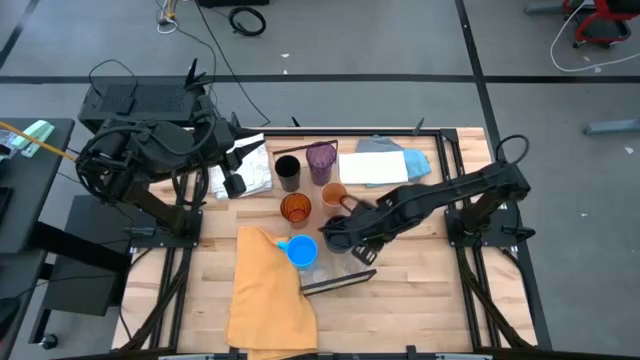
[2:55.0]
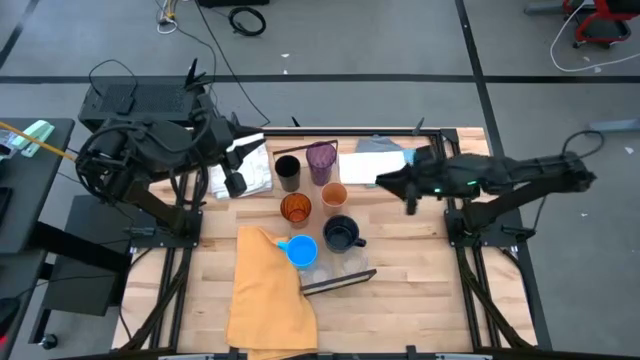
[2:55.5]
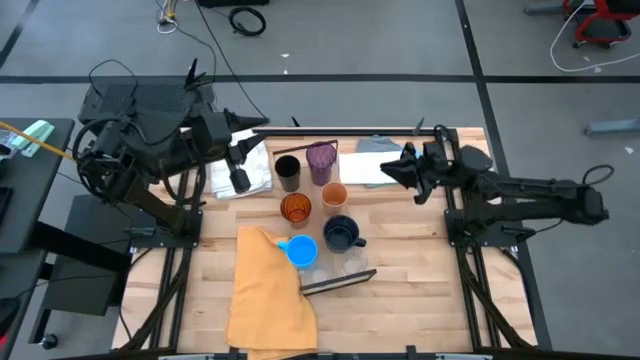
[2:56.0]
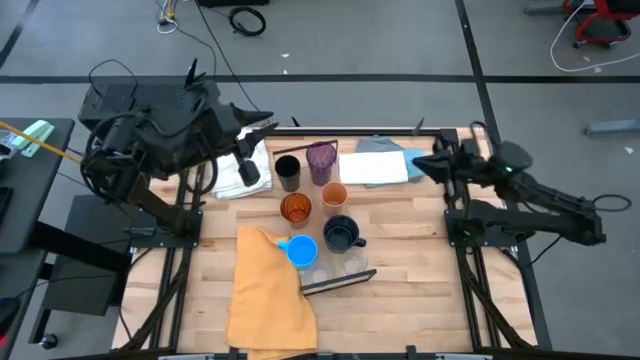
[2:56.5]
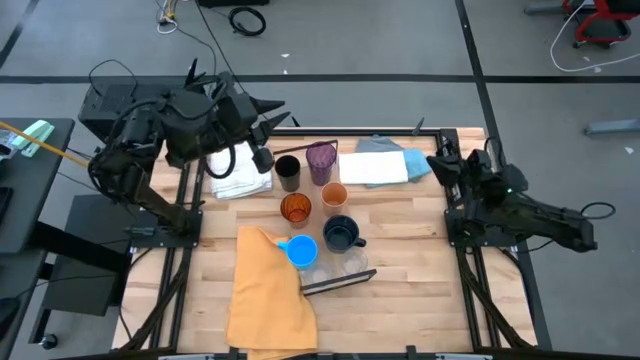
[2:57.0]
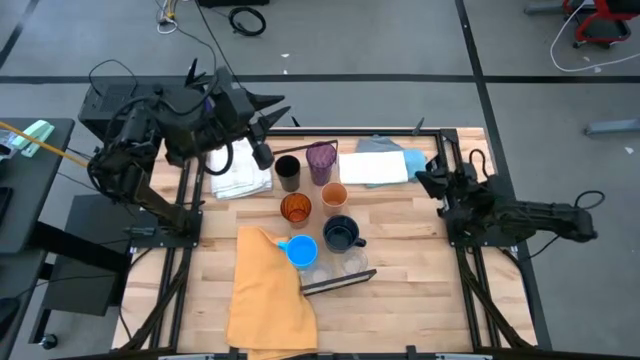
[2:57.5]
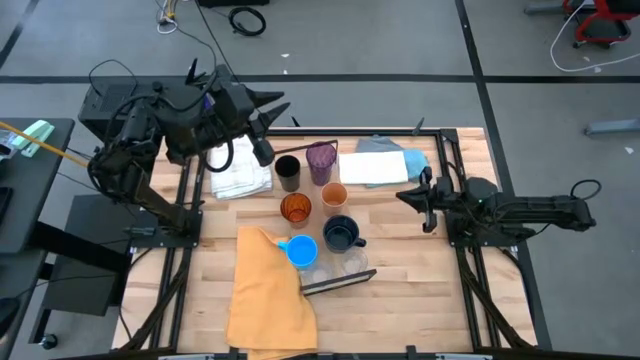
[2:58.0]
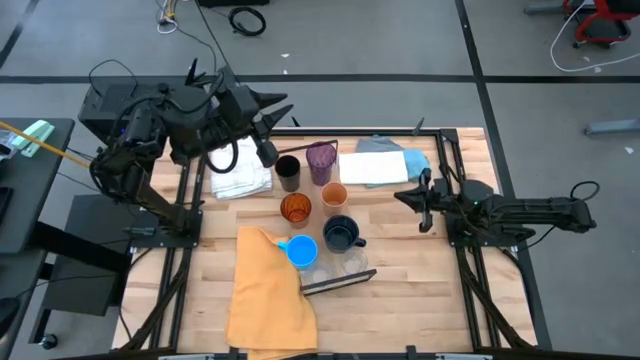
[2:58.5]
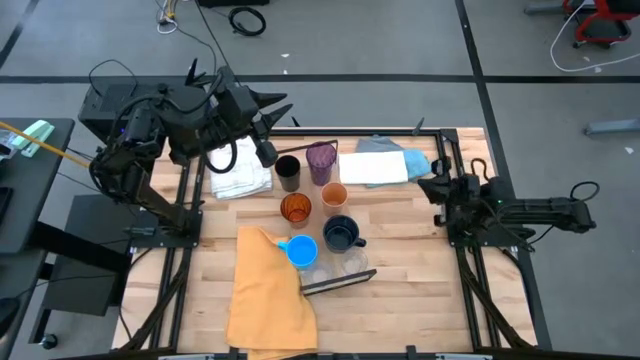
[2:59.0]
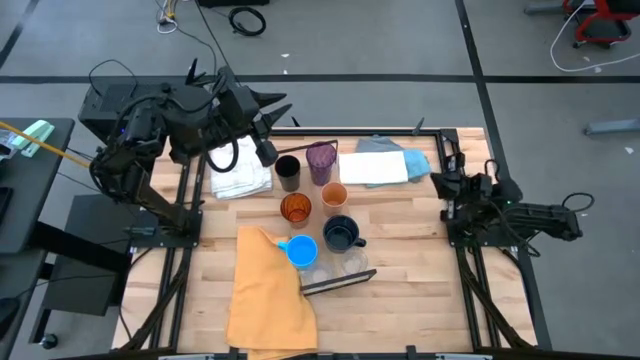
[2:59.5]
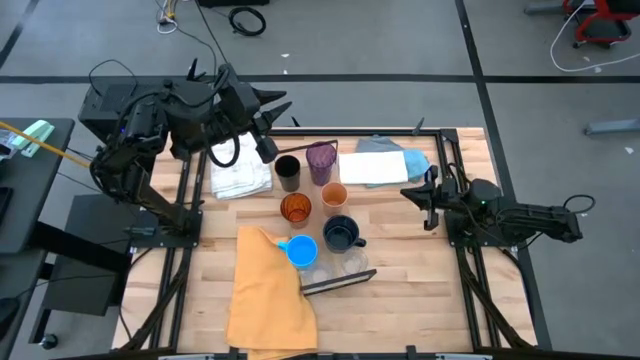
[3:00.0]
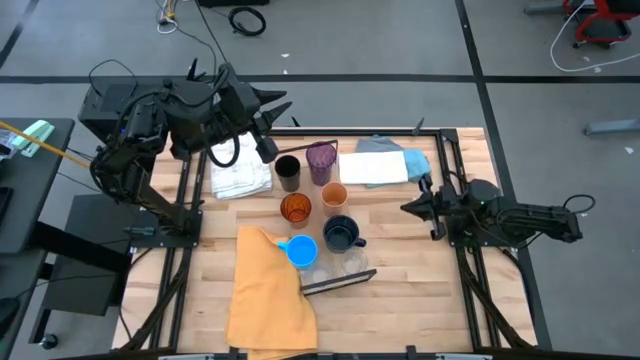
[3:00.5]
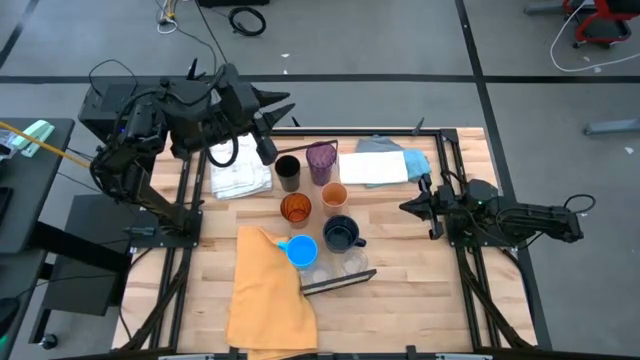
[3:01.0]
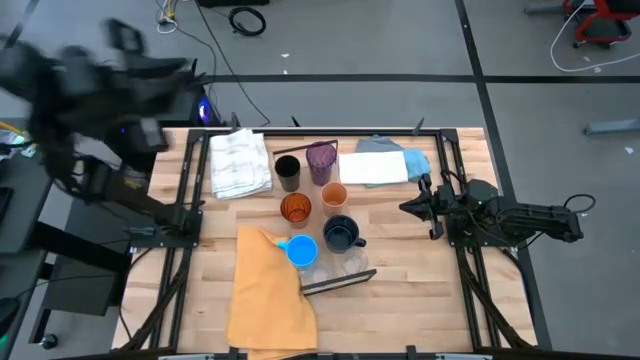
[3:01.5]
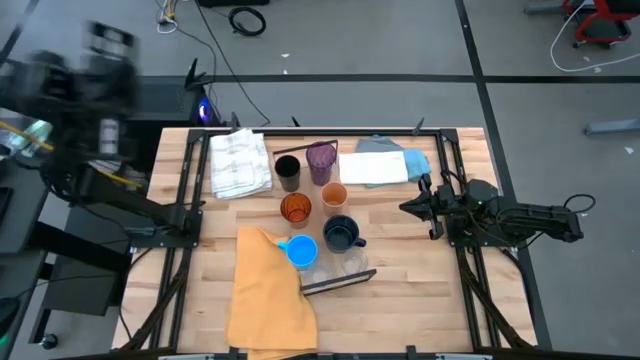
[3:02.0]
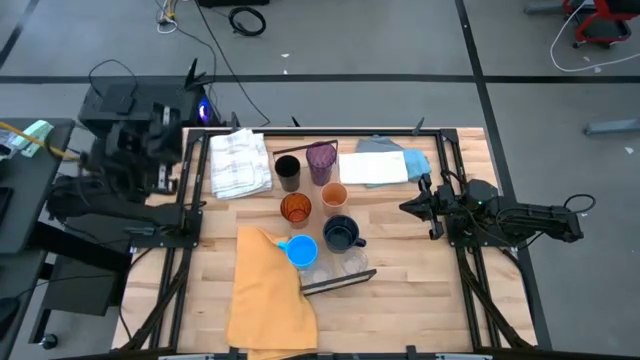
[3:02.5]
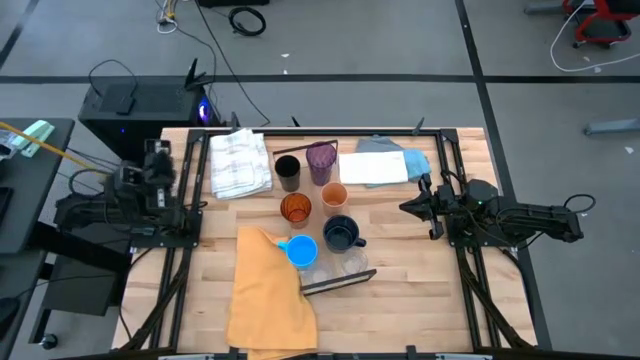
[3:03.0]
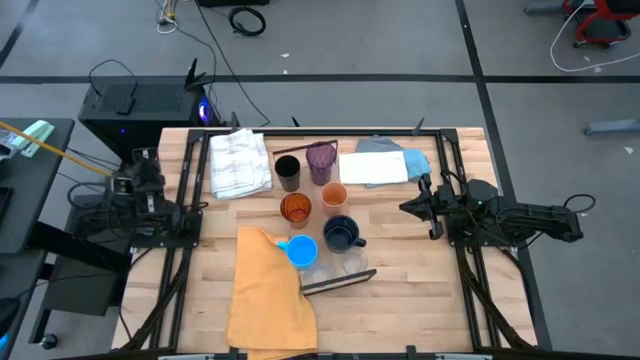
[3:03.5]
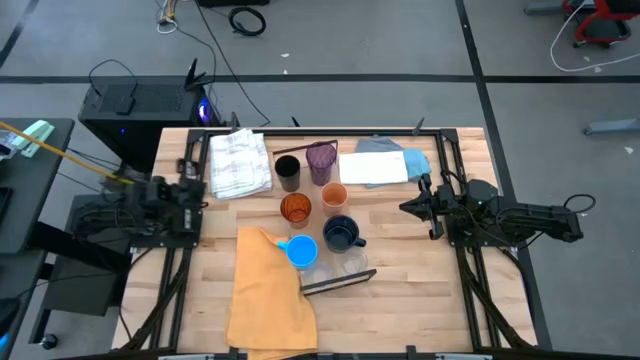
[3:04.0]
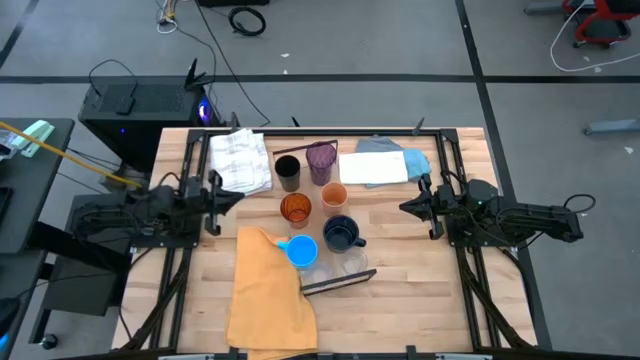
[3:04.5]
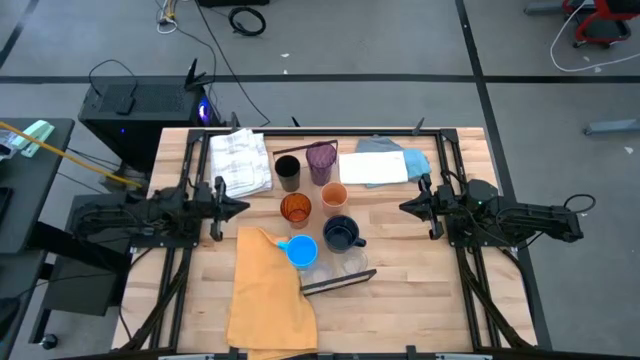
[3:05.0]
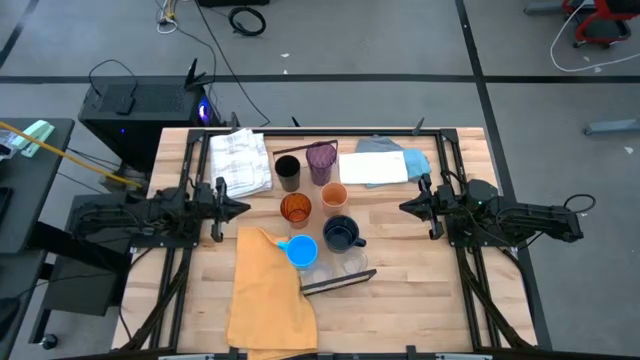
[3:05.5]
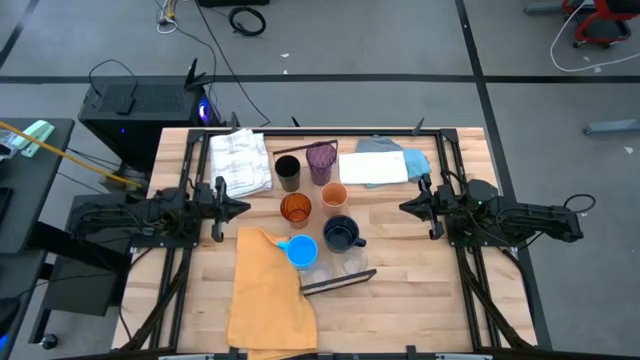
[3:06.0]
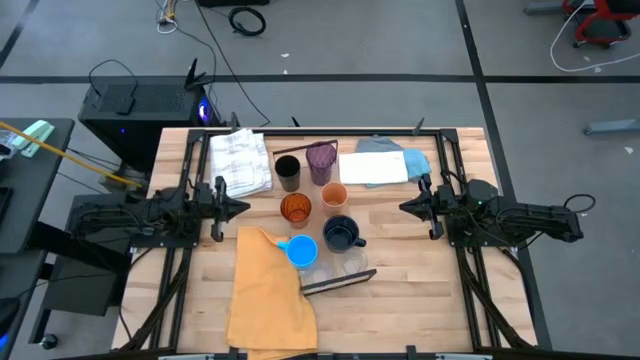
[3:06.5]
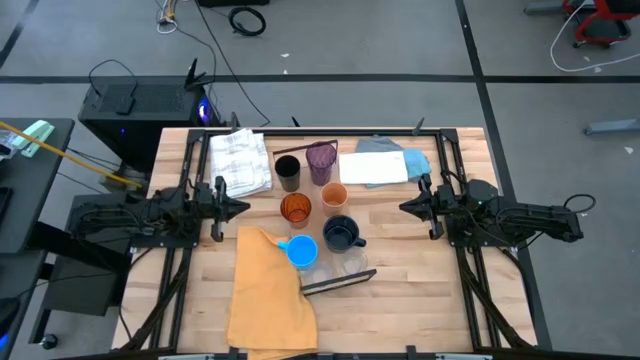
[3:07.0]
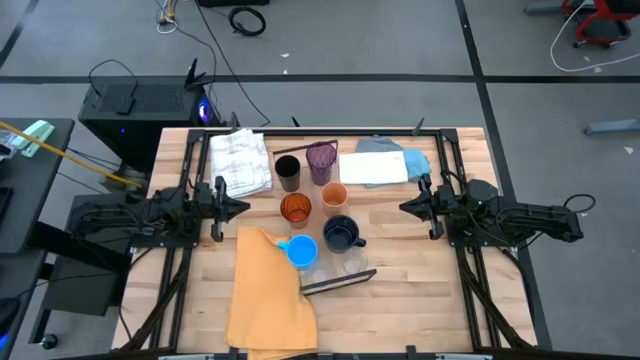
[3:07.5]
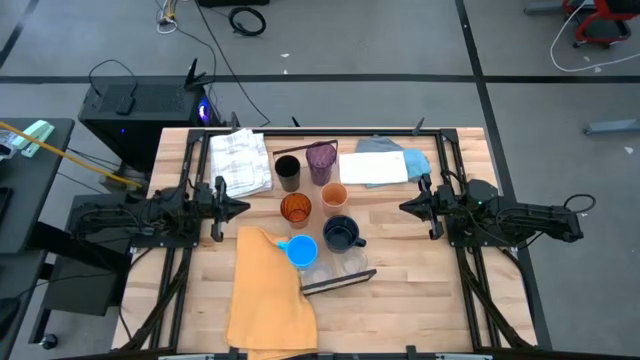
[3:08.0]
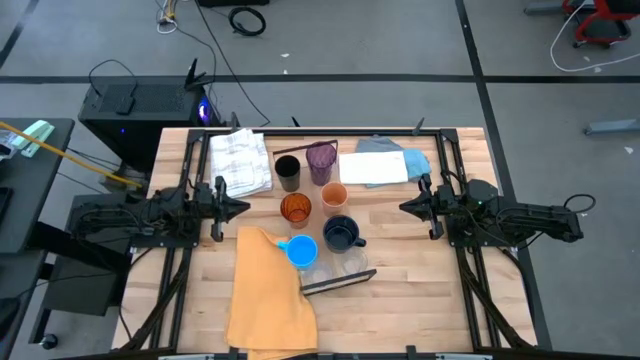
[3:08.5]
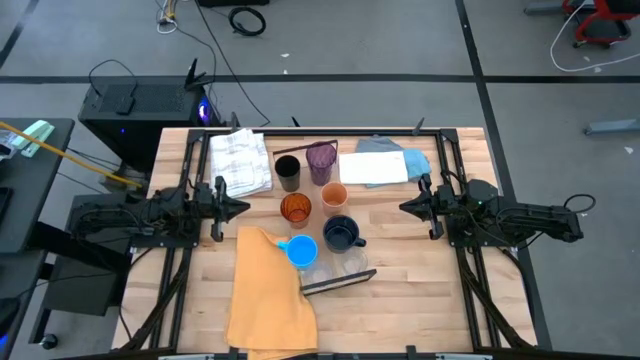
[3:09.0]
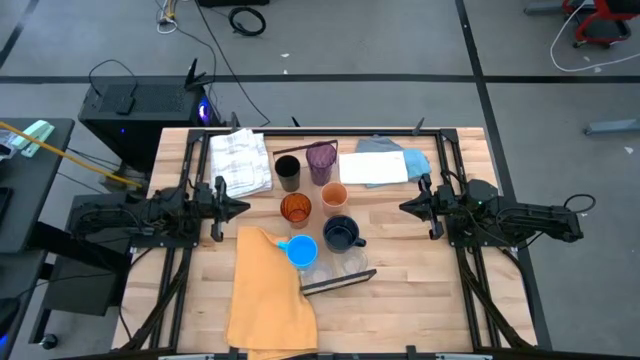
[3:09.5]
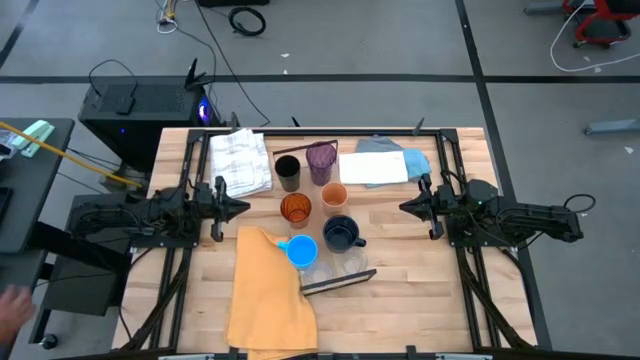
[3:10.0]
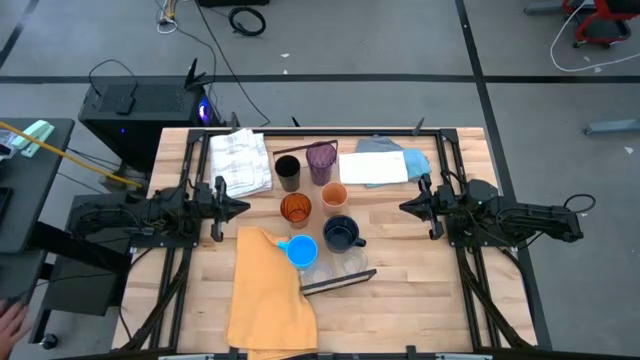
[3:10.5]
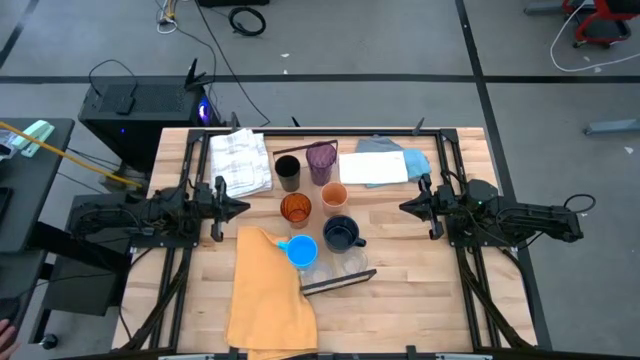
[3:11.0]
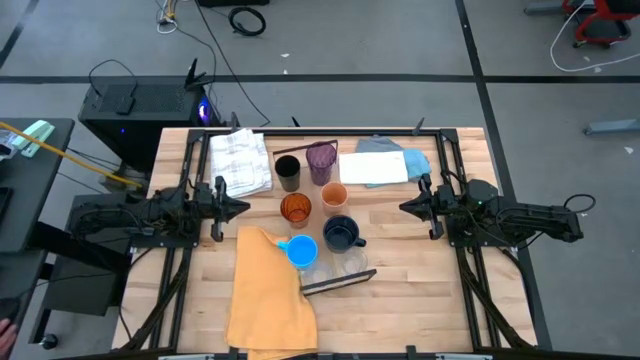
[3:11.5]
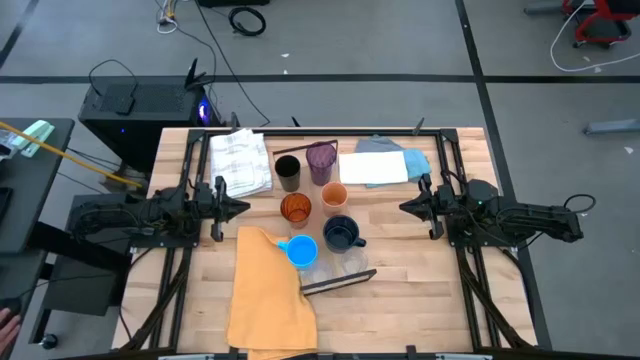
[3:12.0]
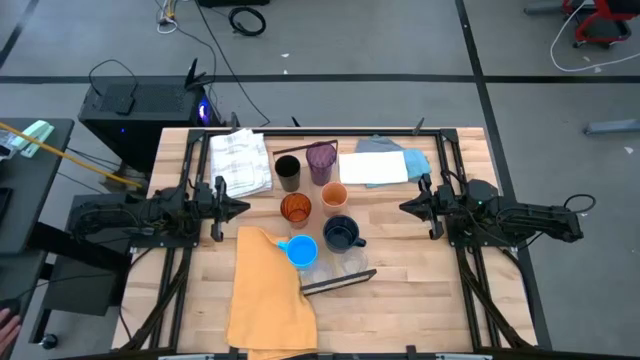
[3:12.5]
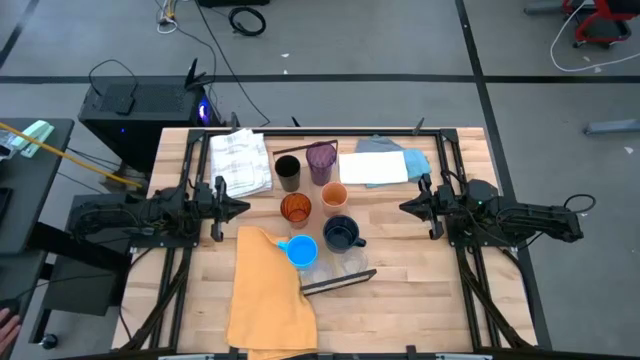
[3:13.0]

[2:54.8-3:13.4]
Task: Stack small to large cups/mugs on shelf
Return to Home Position

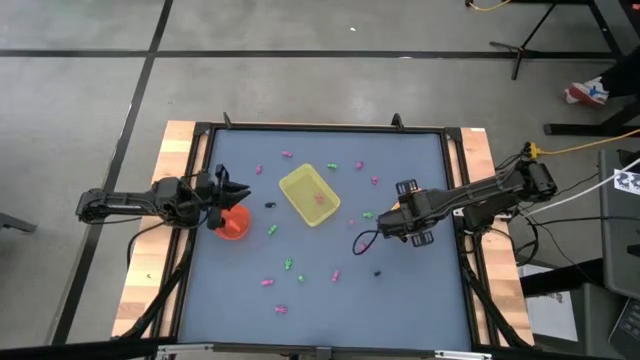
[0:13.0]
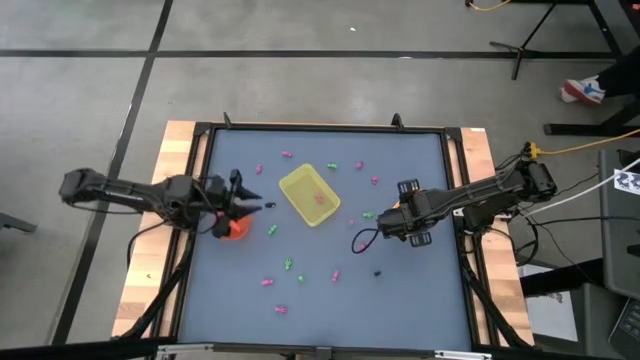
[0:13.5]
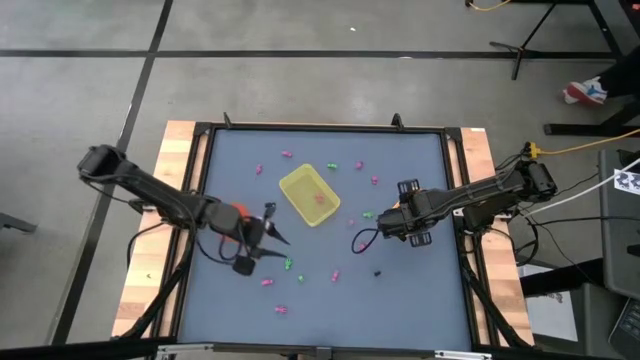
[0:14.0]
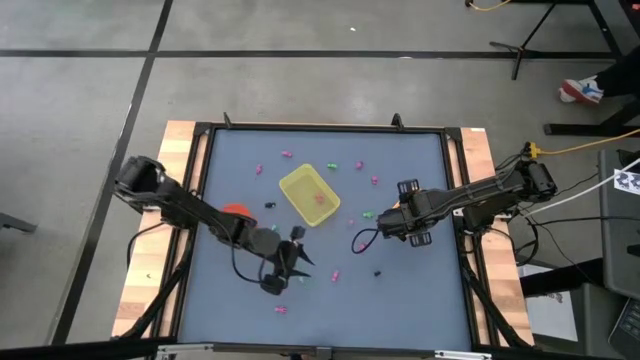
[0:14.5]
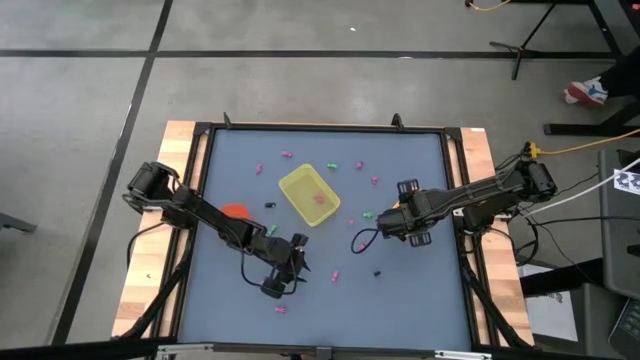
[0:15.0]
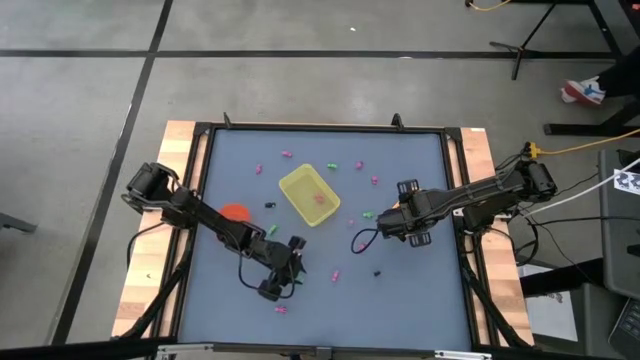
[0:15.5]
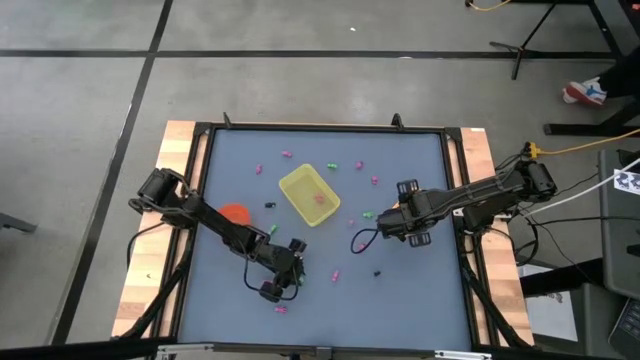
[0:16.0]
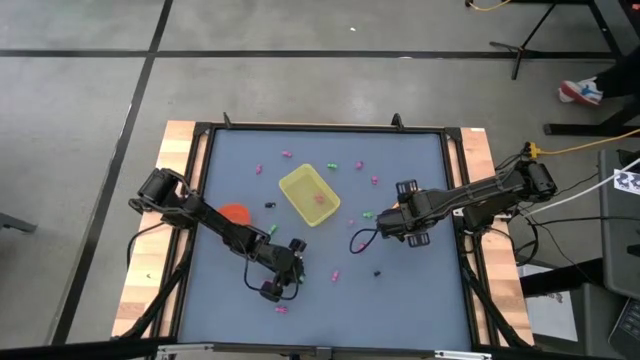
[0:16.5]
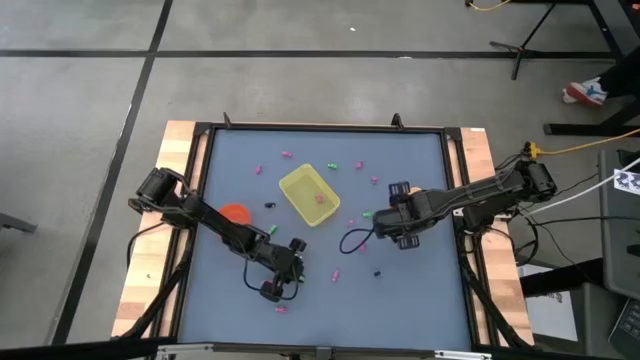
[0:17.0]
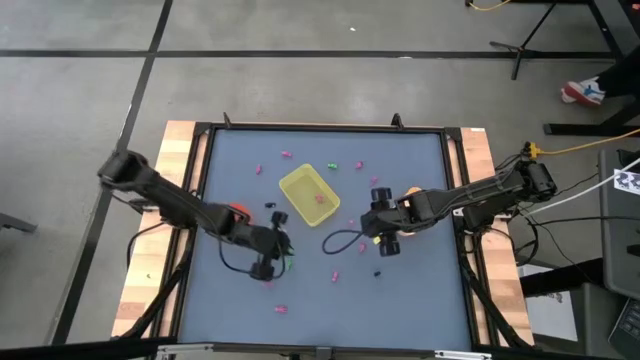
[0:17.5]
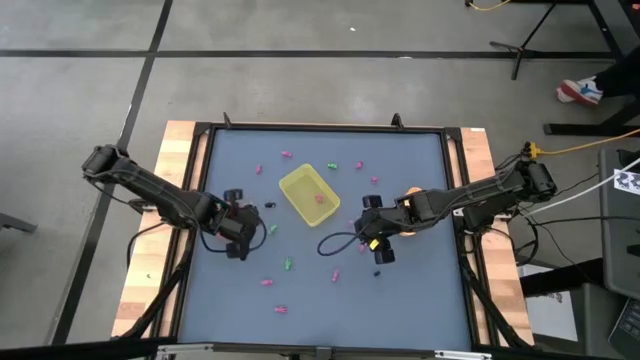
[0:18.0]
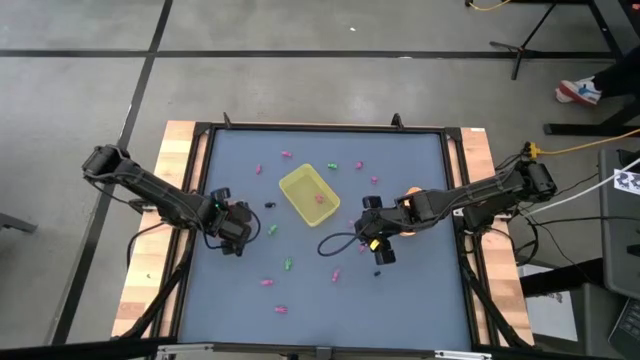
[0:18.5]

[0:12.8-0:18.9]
Task: Sort Halloween decoration
Put the green skeleton toy into the orange bin
